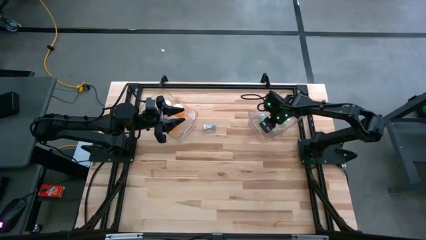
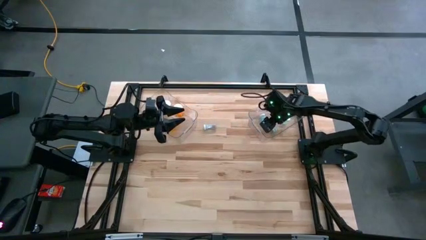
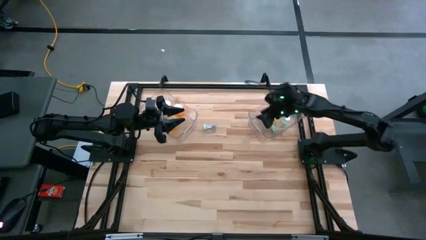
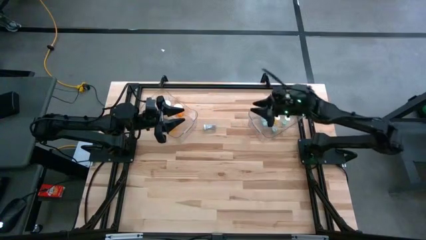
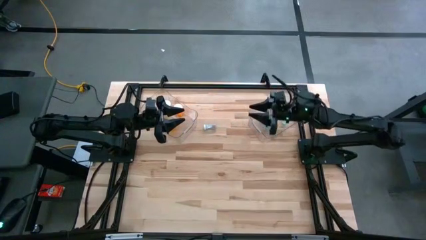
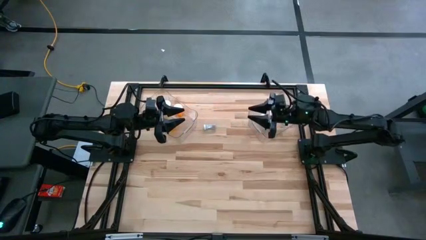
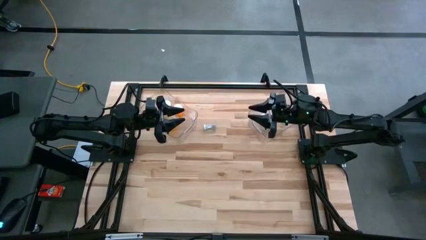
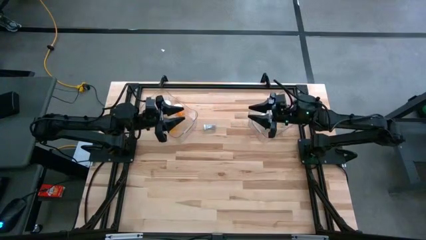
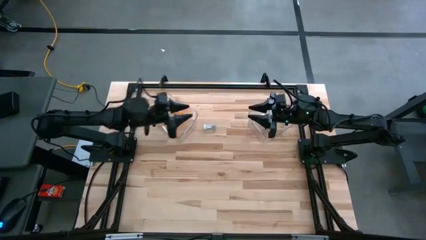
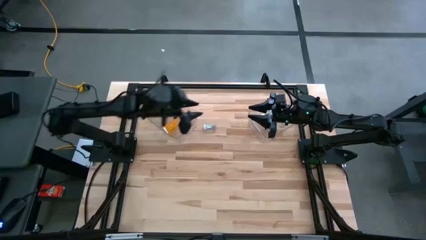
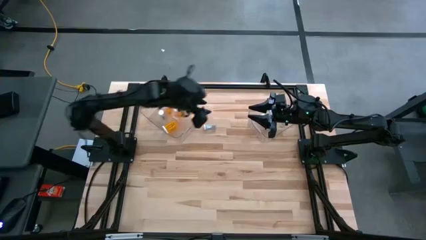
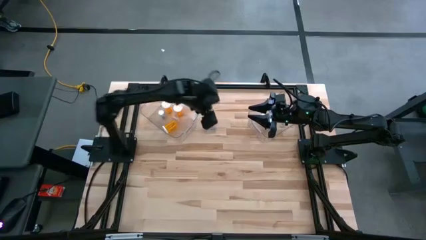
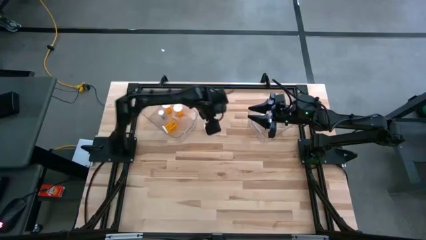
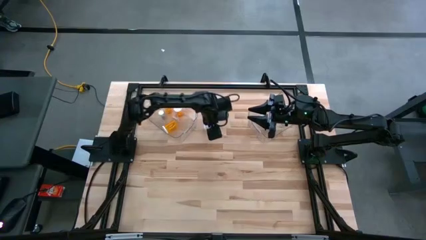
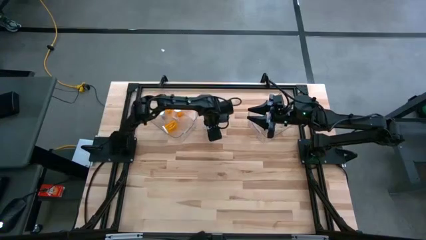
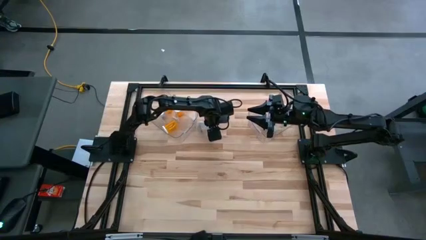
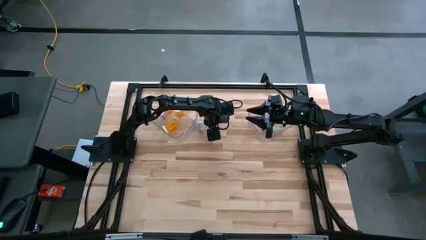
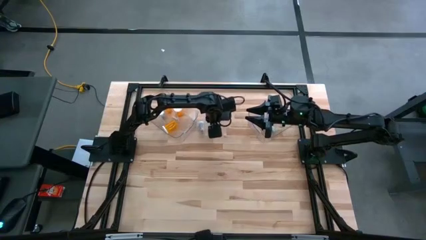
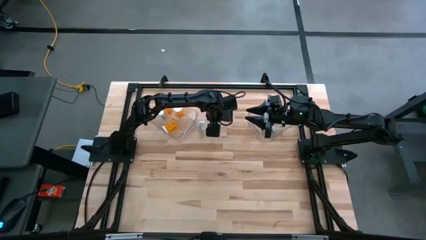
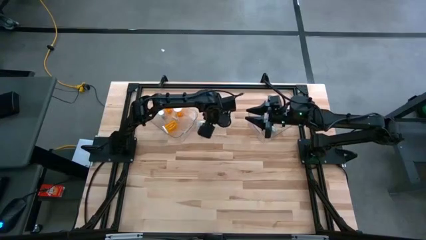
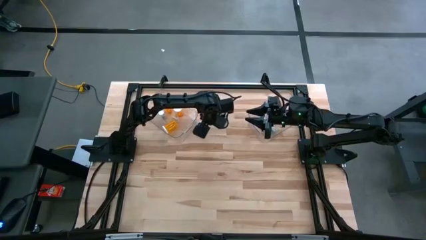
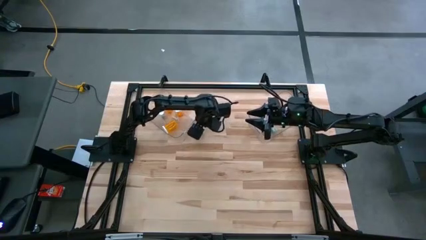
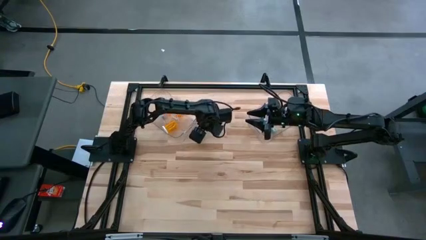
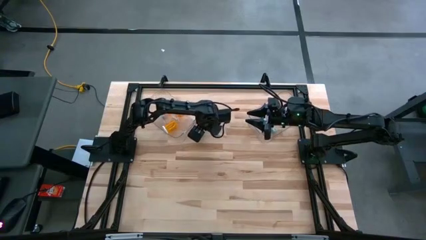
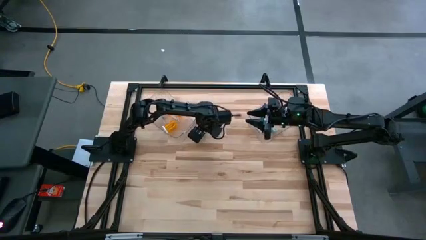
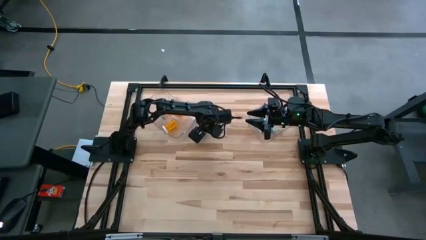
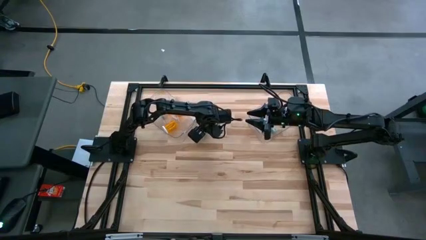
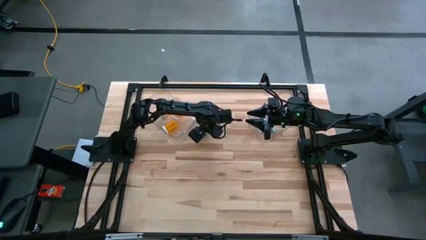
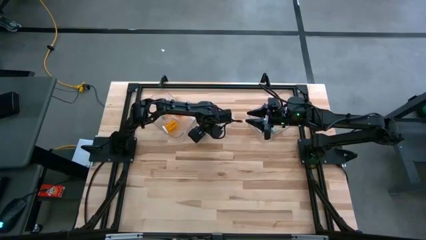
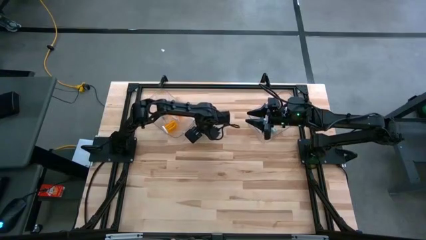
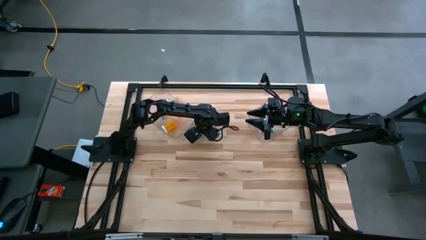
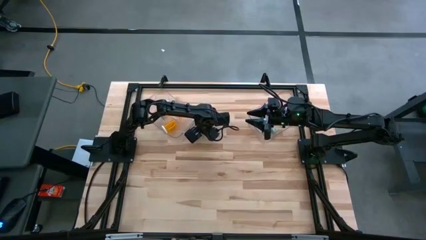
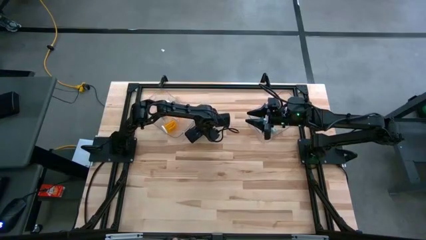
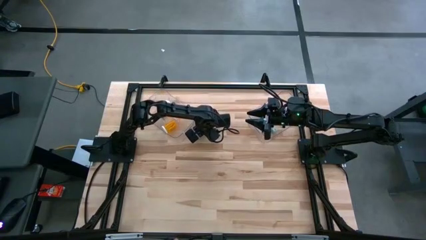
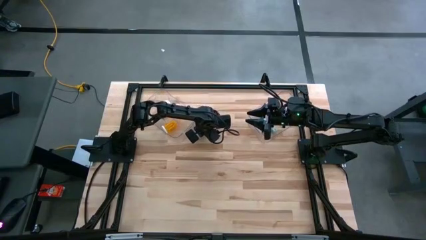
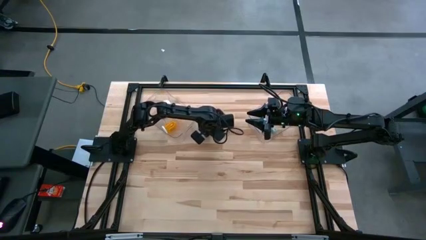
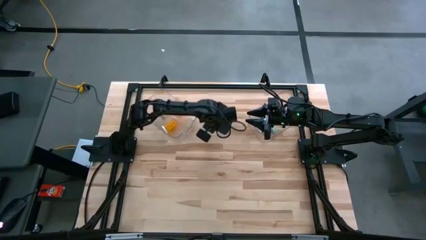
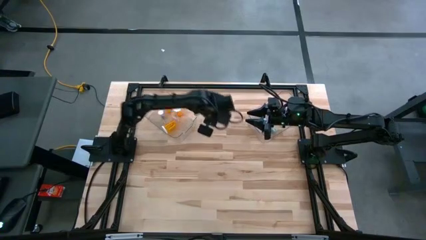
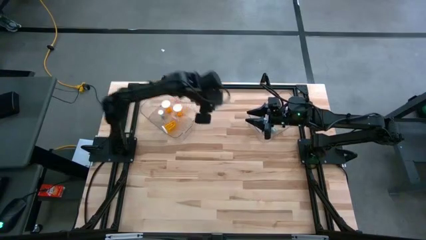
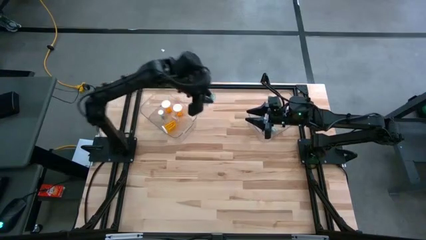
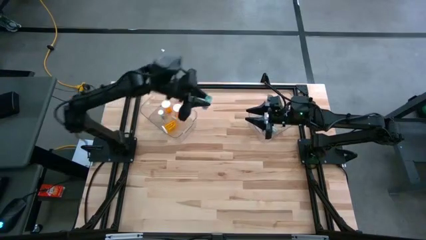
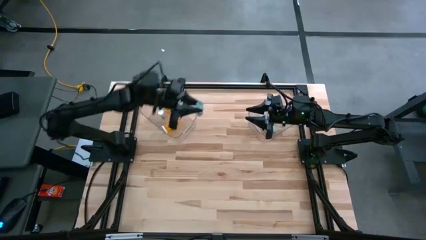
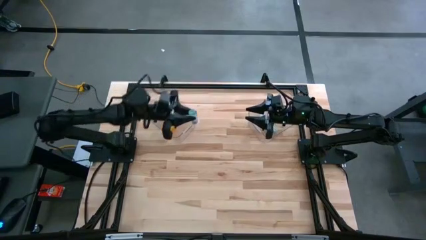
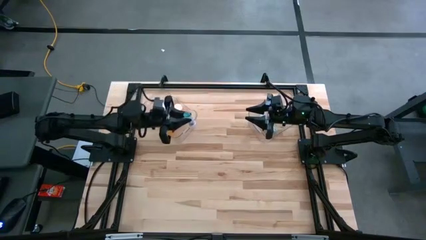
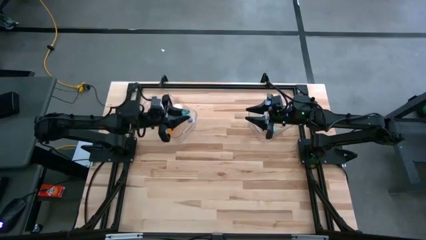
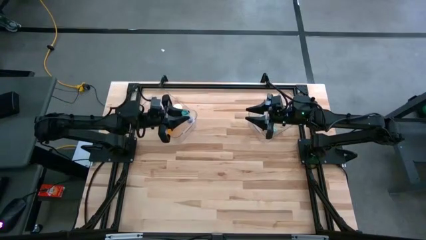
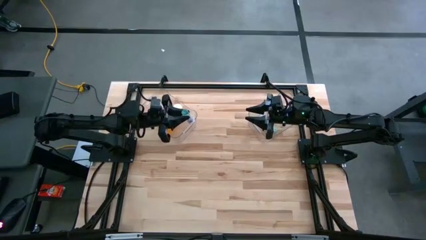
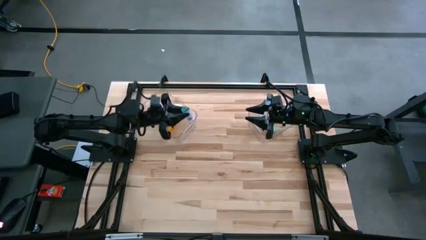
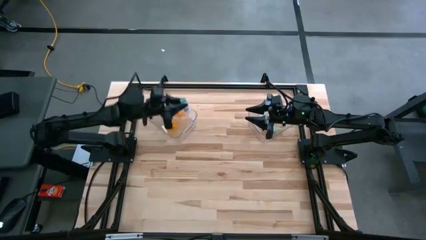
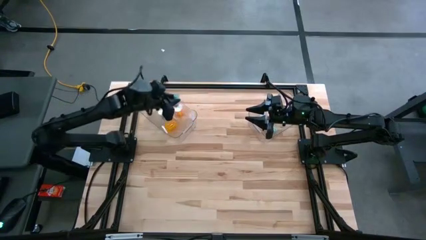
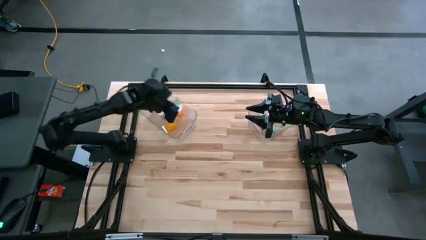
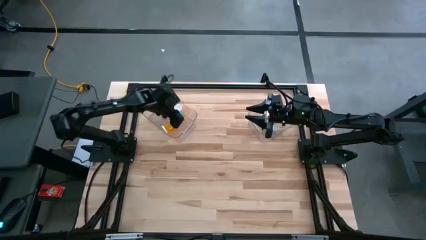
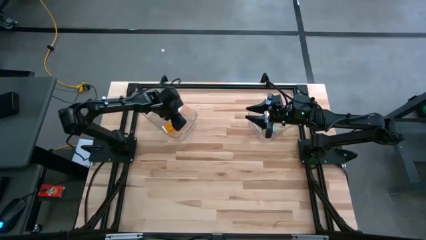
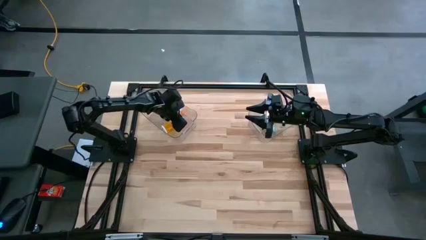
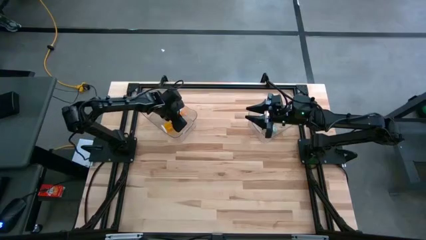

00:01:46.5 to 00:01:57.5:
Task: Pick and place medicine bottles into bin by pill shape (circle, oval)
Put the green capsule bottle into the left transparent bin

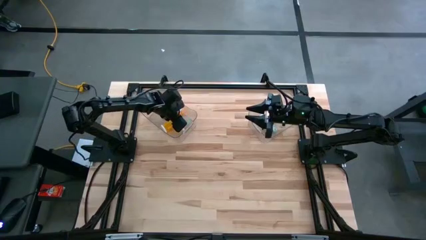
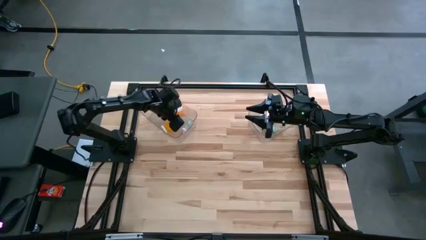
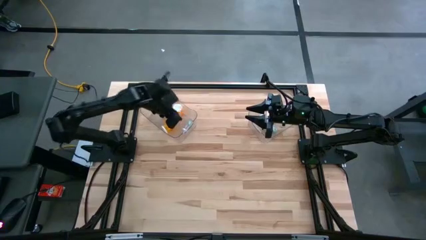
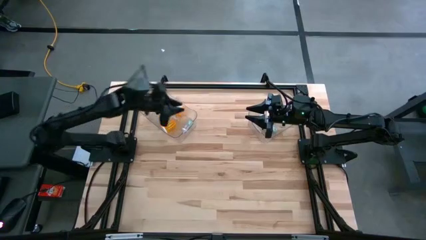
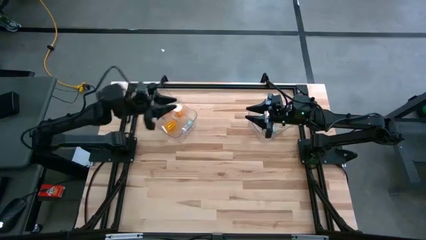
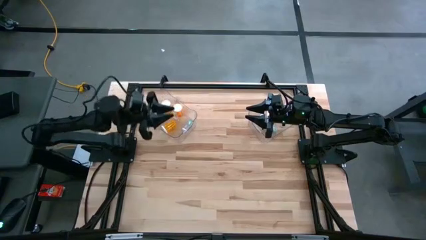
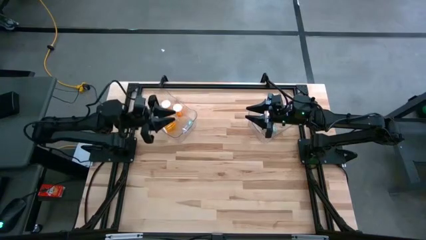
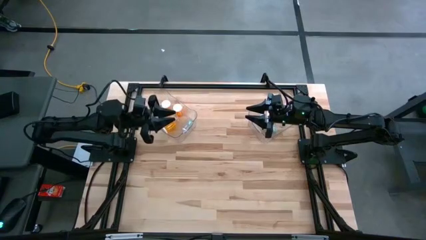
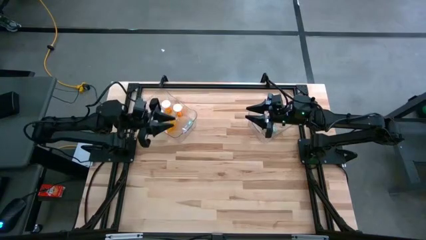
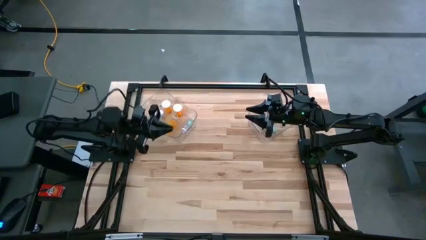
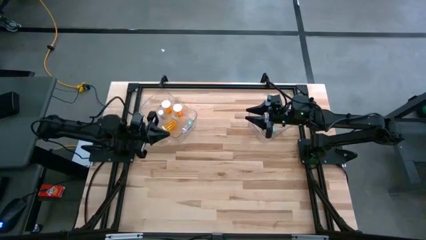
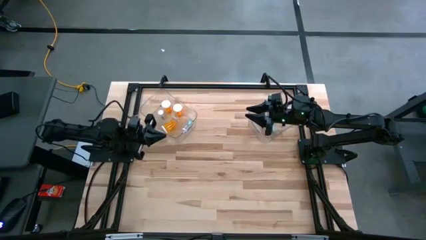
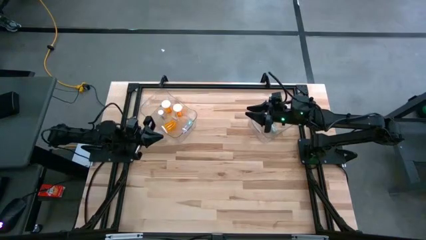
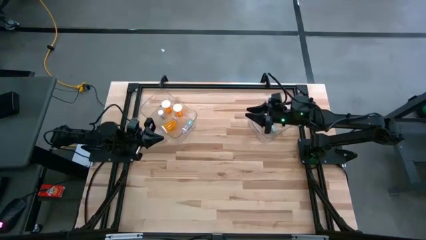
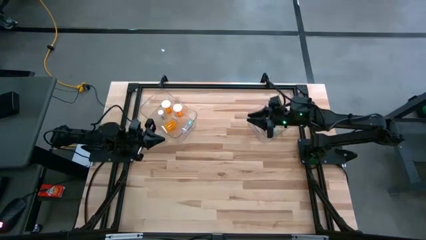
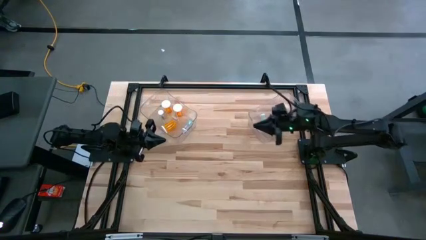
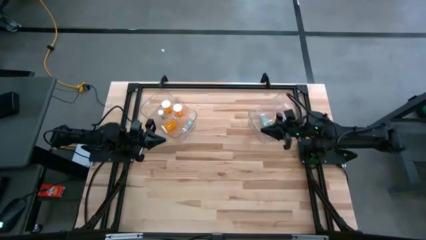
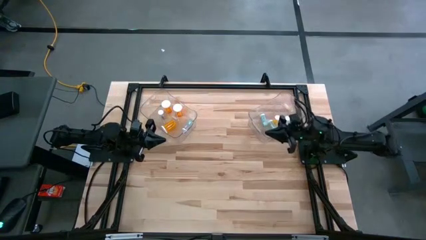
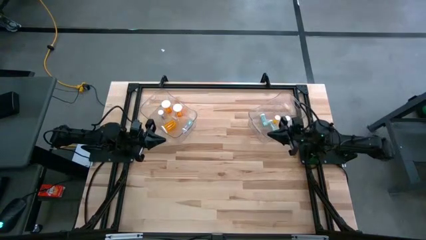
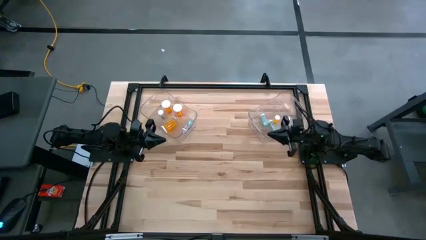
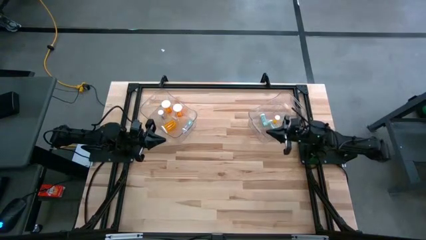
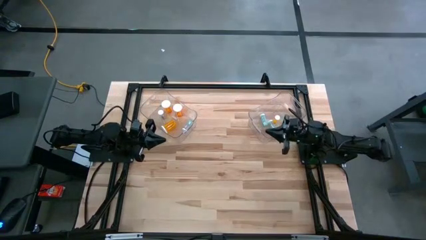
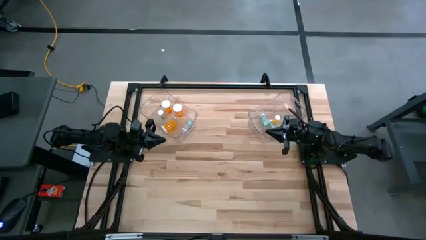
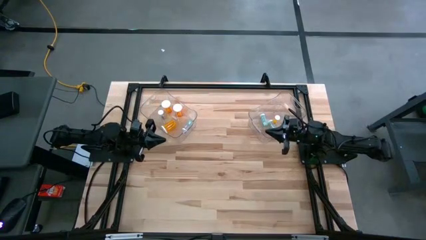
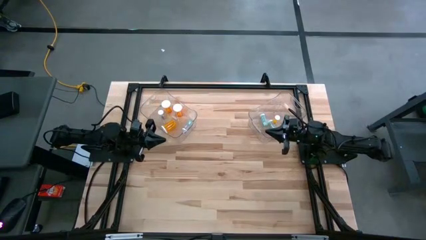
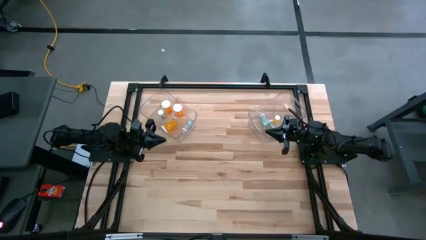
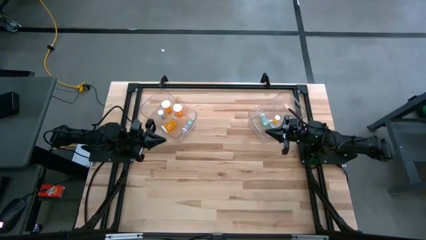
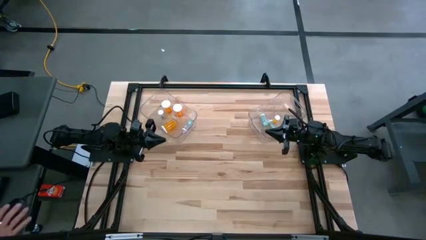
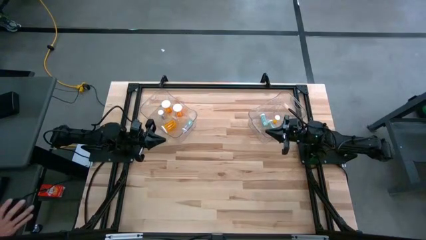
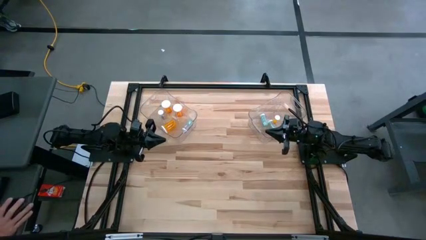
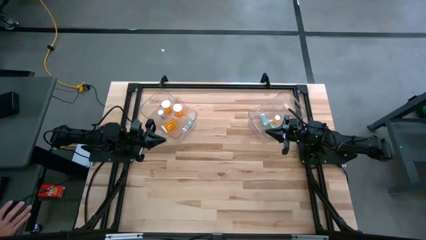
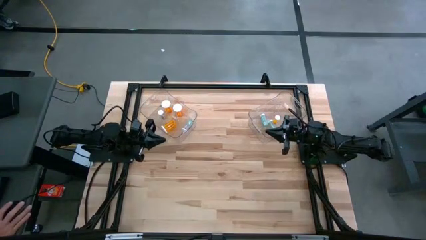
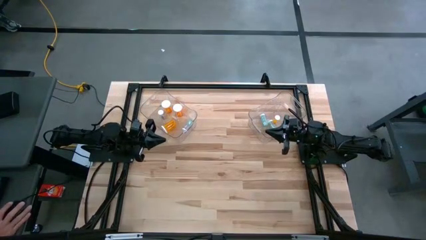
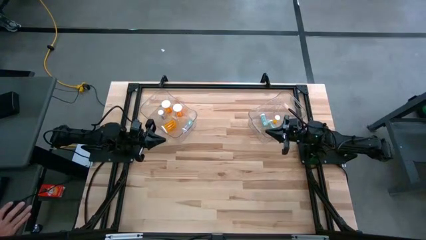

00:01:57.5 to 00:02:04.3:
Return to Home Position
